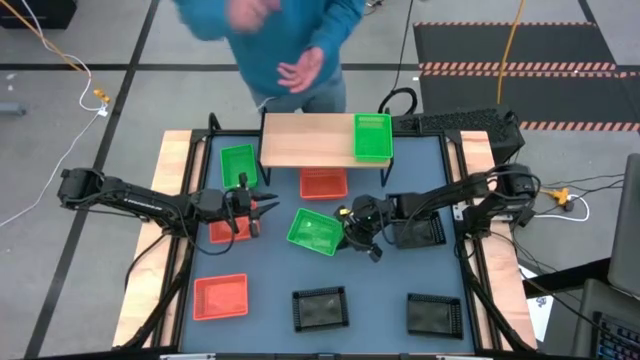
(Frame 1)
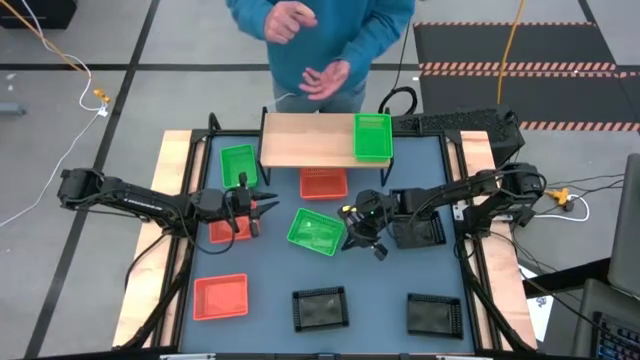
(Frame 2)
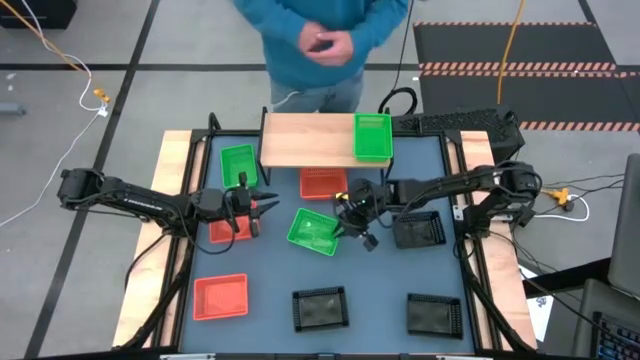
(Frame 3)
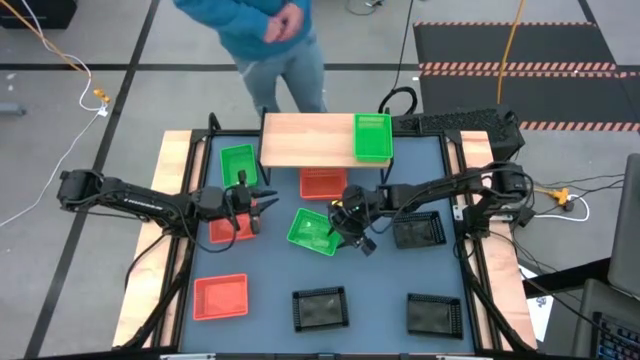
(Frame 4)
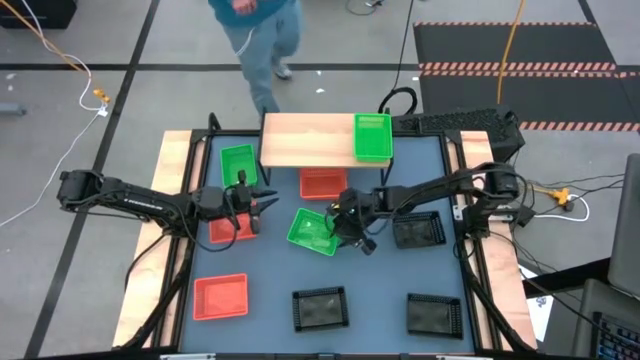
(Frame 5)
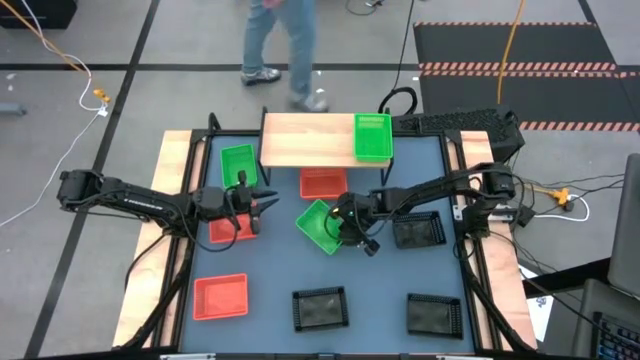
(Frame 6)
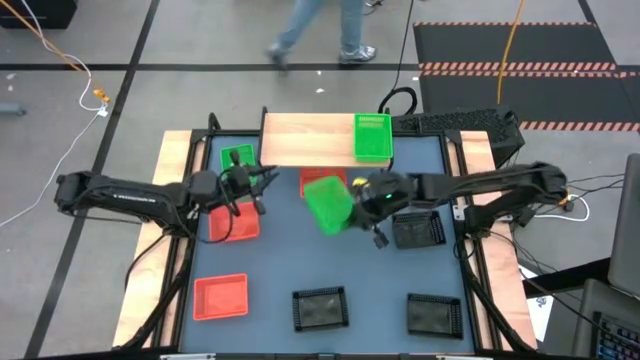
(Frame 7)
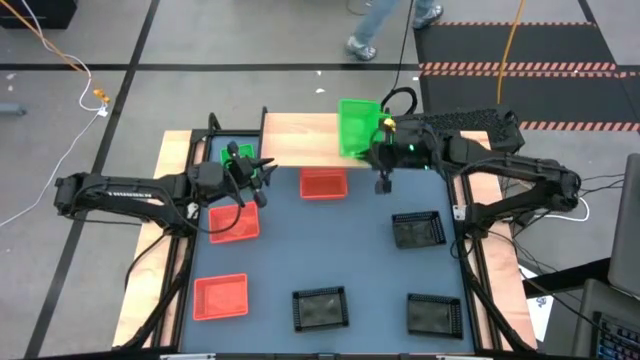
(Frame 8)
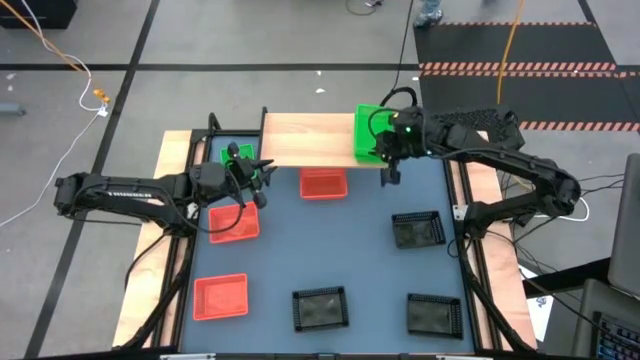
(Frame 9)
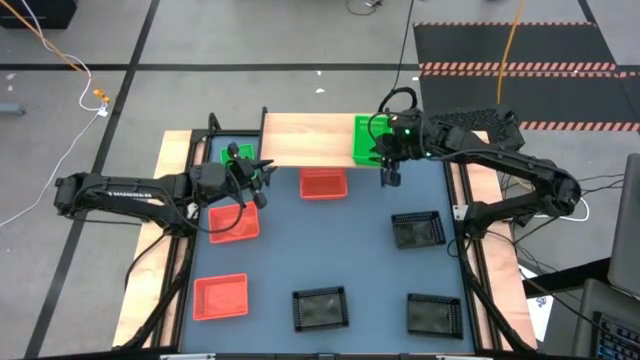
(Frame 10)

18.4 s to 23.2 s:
Task: Stack baskets on shelf by color
Stack the bottom green bin on top of the green bin on the shelf

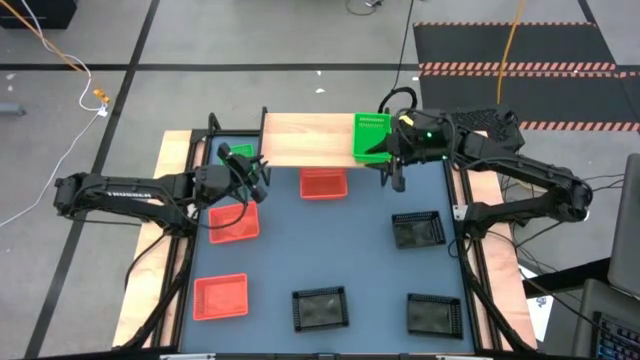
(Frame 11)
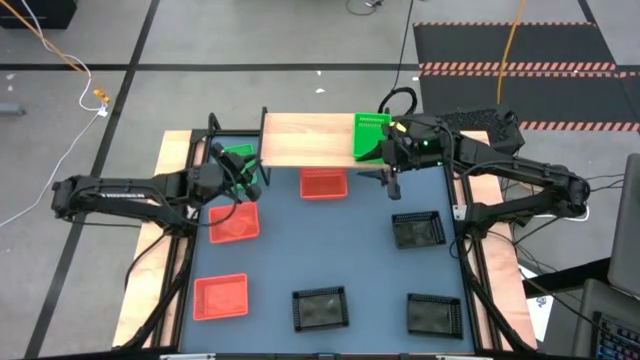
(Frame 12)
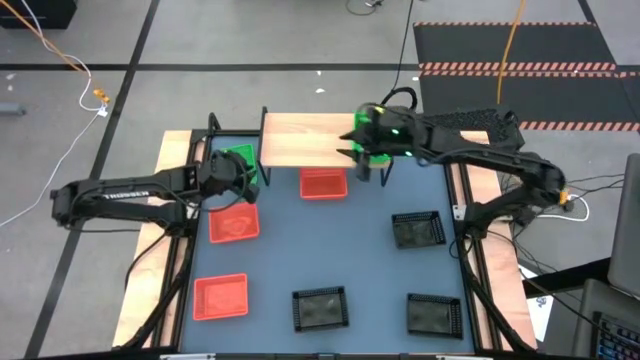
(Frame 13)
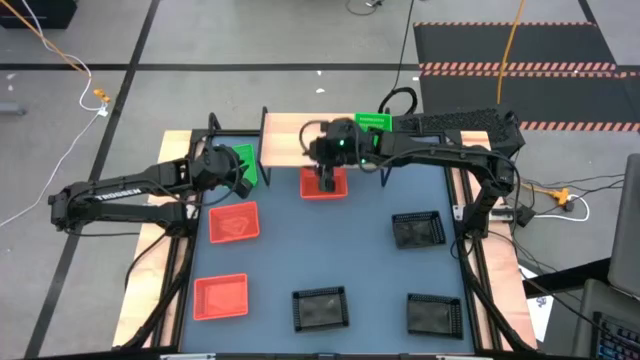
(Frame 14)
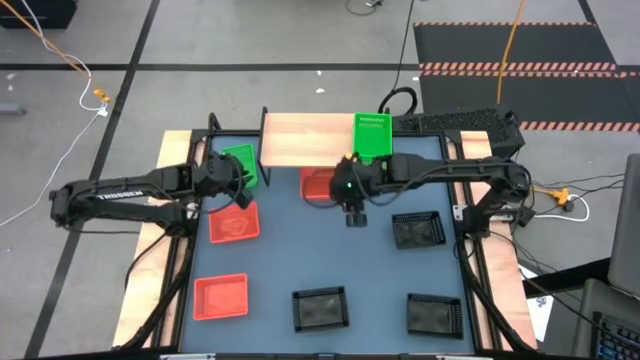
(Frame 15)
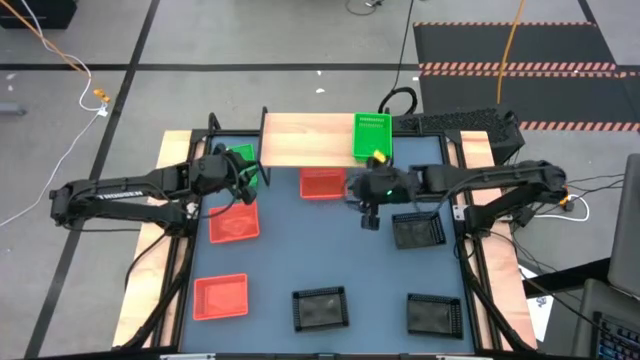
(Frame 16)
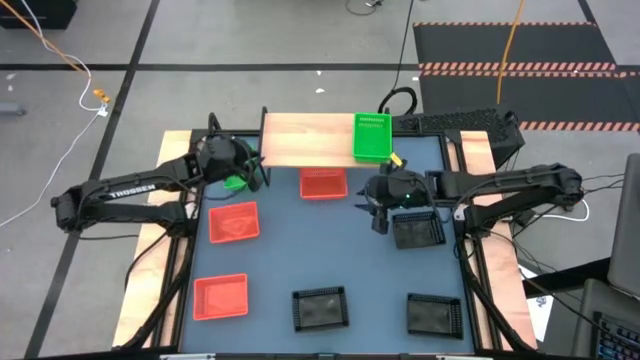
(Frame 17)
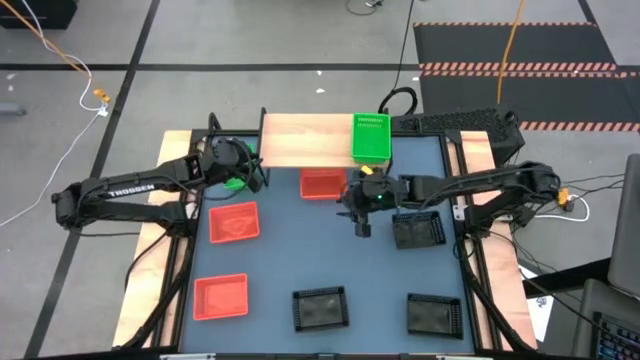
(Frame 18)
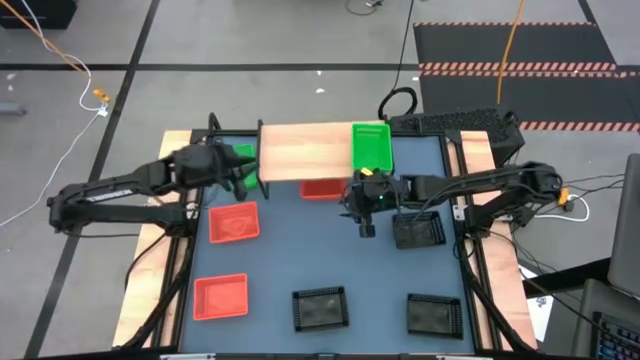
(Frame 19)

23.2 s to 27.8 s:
Adjust the shelf on the table

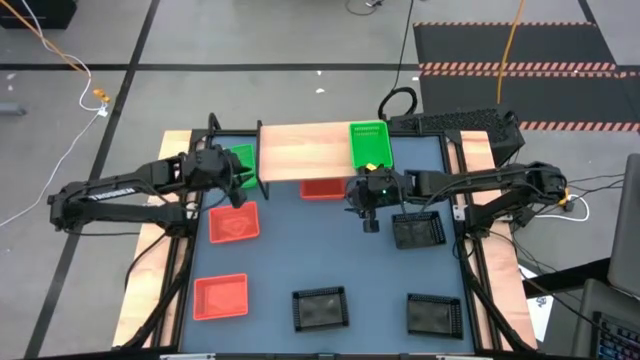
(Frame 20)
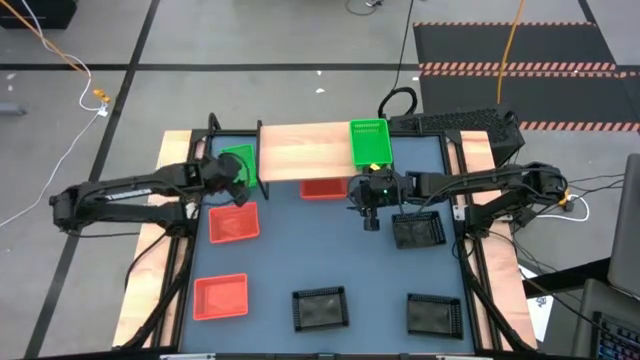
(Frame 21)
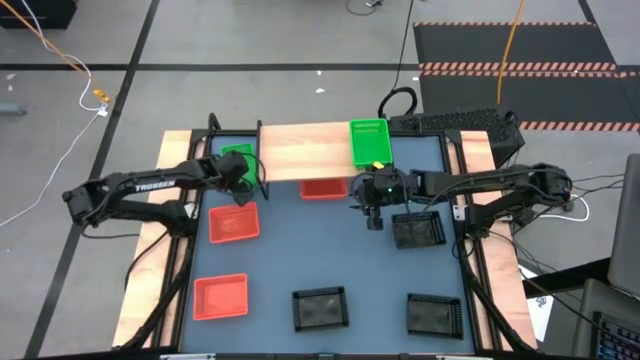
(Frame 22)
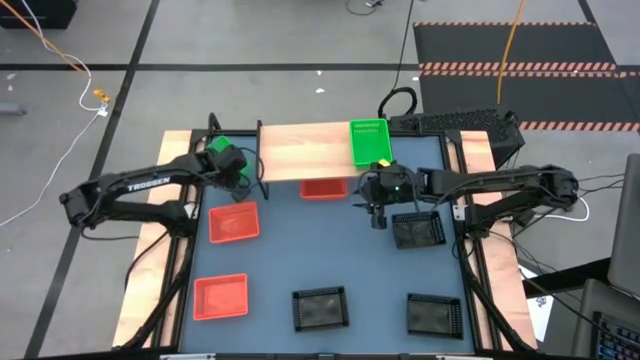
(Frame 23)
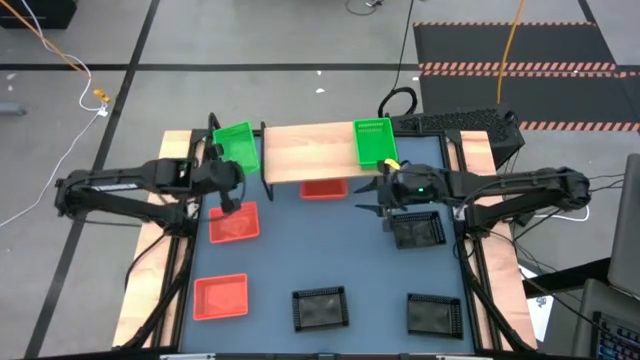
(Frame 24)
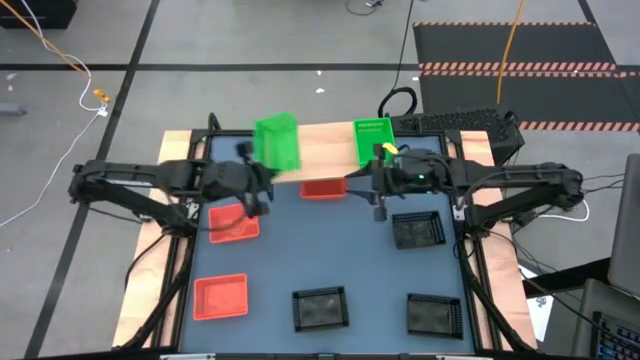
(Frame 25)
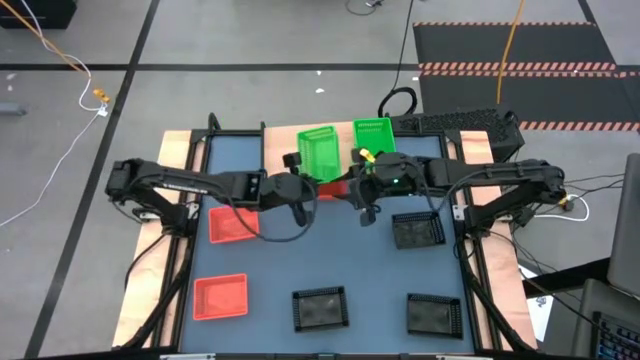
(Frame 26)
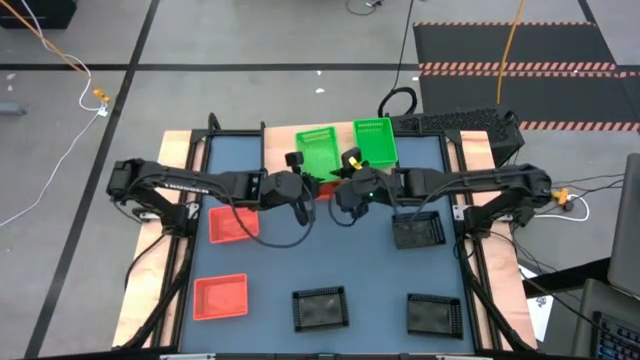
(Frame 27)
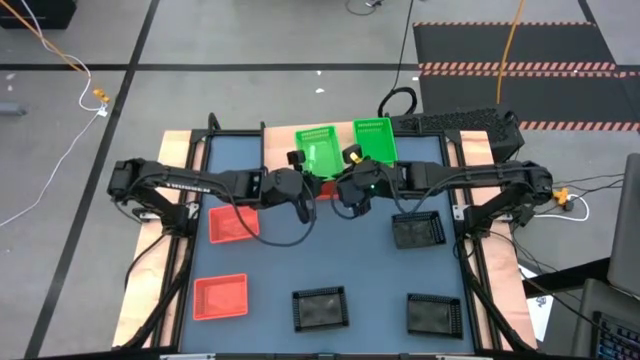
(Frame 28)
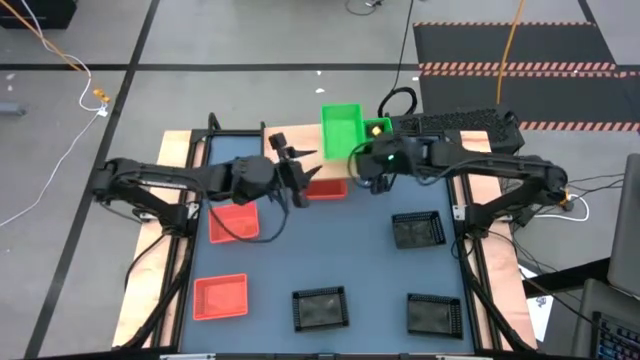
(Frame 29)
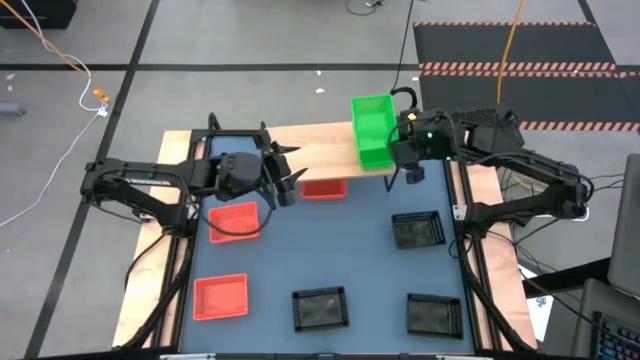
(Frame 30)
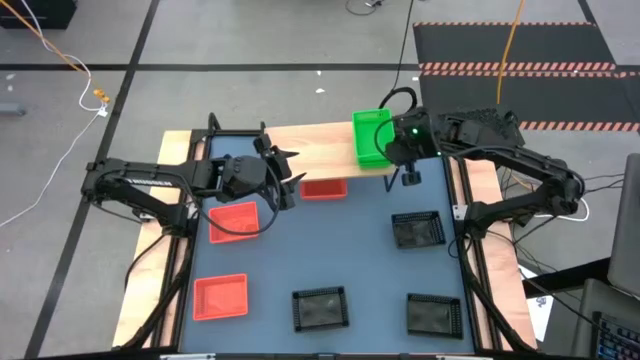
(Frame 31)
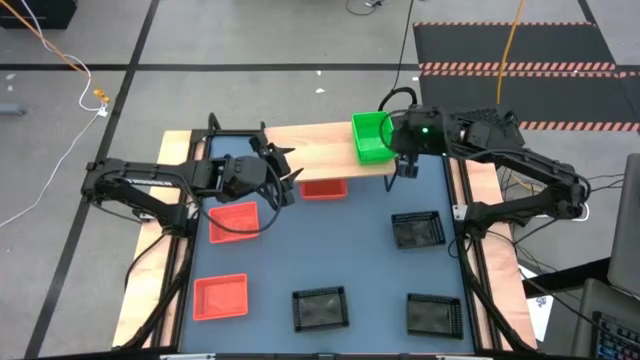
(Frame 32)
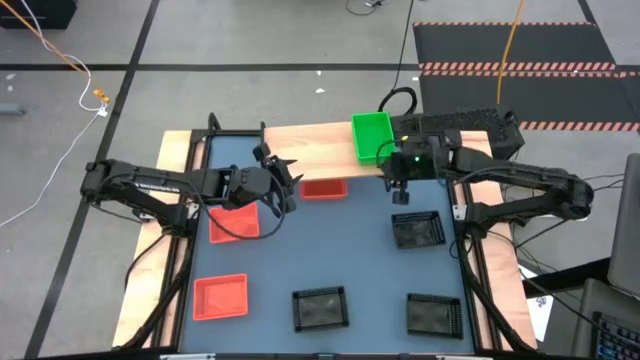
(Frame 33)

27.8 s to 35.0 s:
Stack the green bin on top of the green bin on the shelf

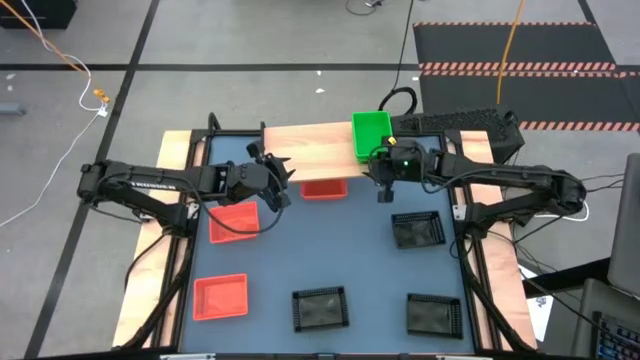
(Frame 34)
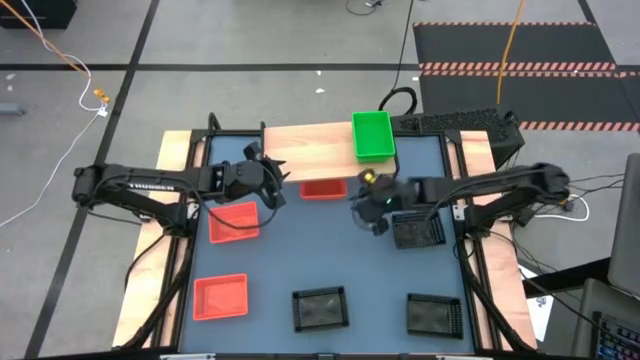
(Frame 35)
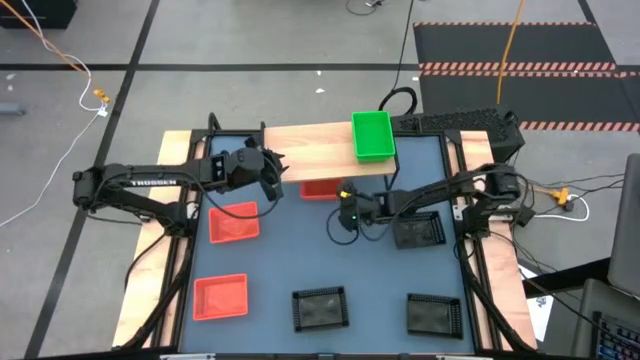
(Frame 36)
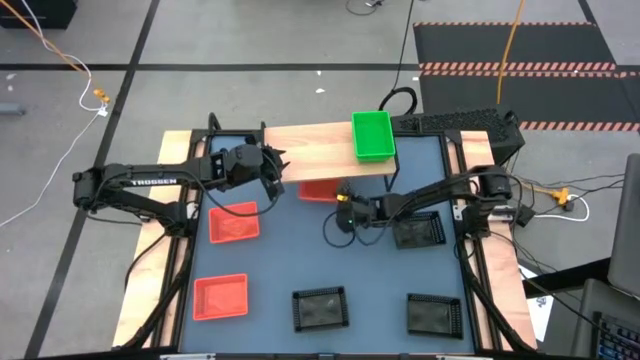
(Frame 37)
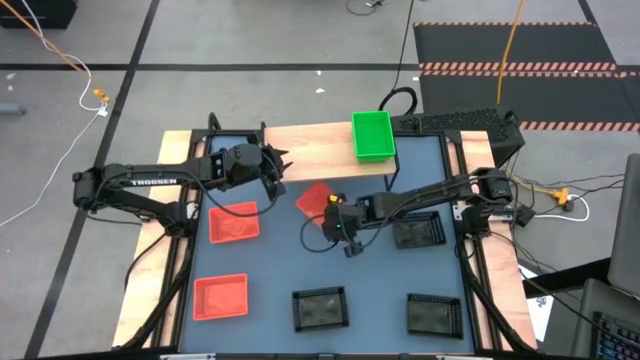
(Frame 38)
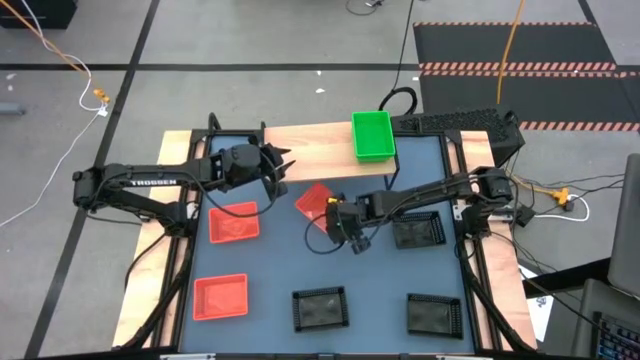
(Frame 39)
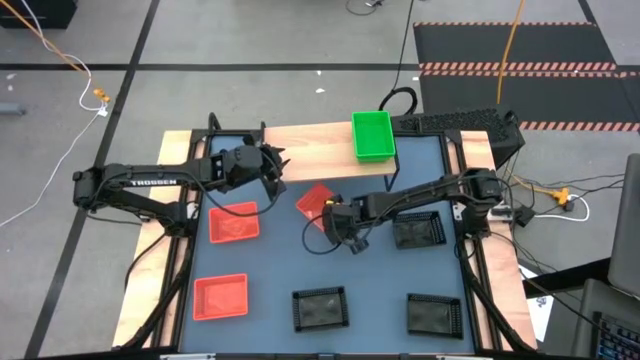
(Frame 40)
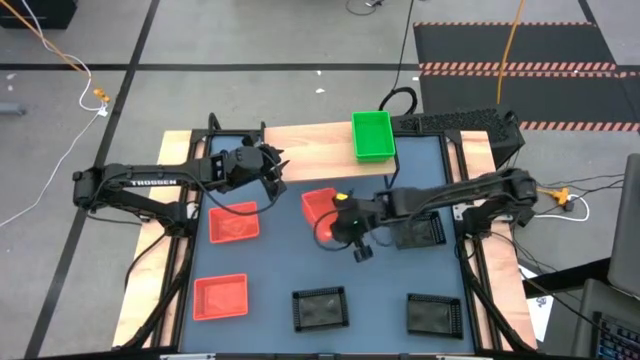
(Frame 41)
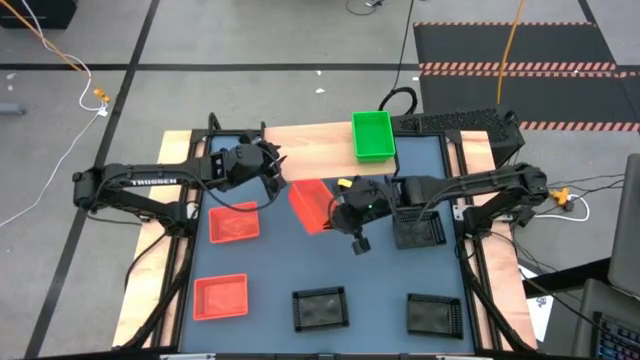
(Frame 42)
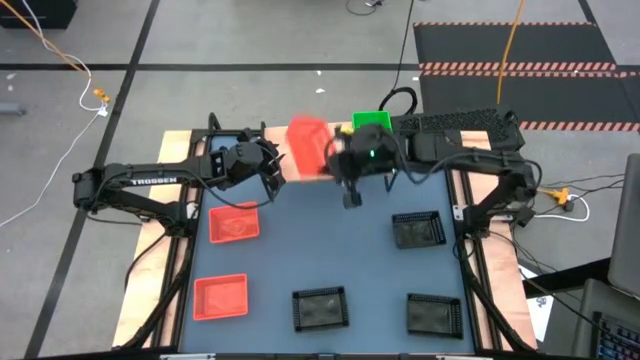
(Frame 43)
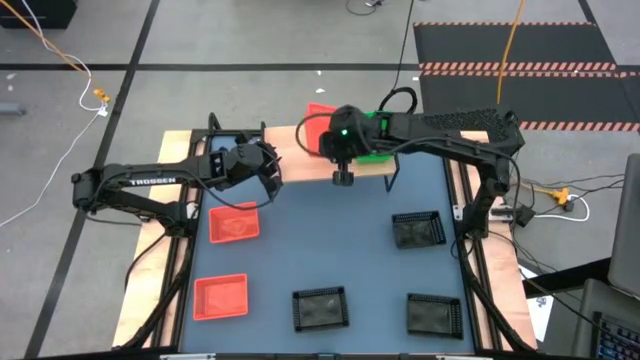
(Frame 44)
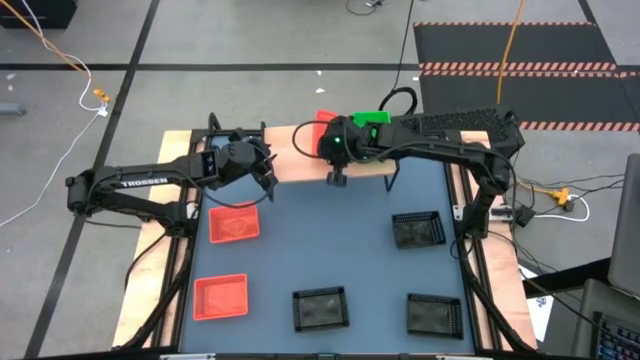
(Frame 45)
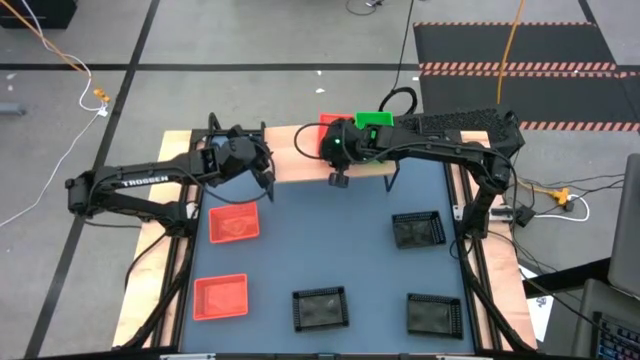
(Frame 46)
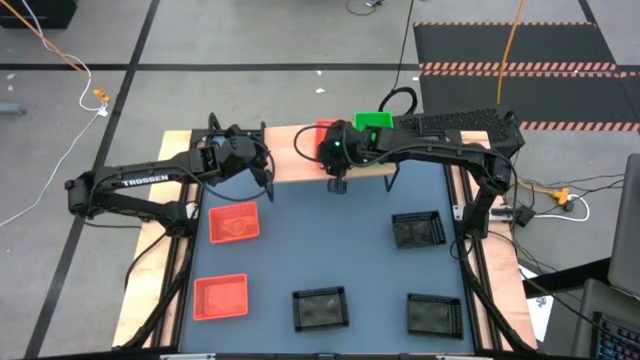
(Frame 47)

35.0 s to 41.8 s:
Put the top right orange bin on the shelf
